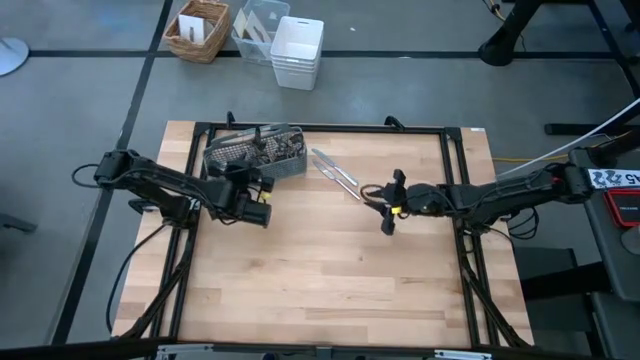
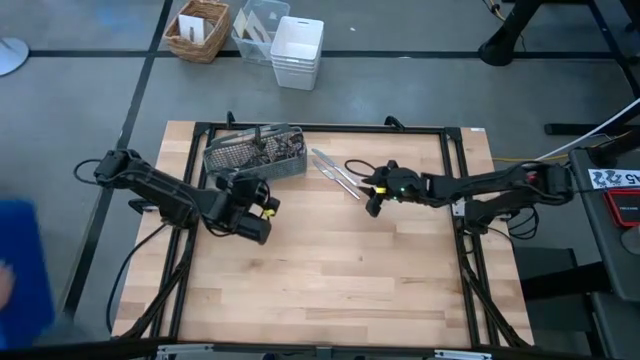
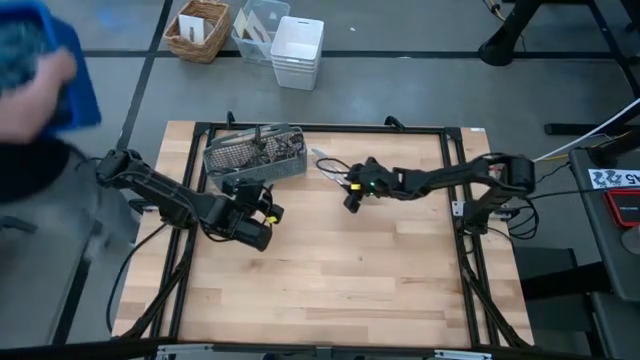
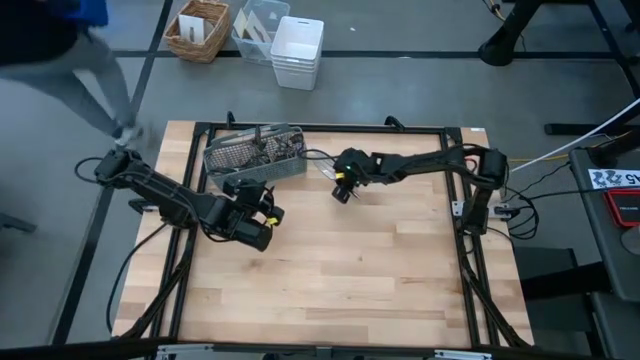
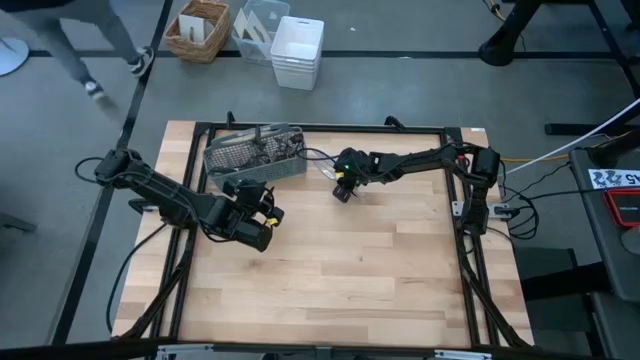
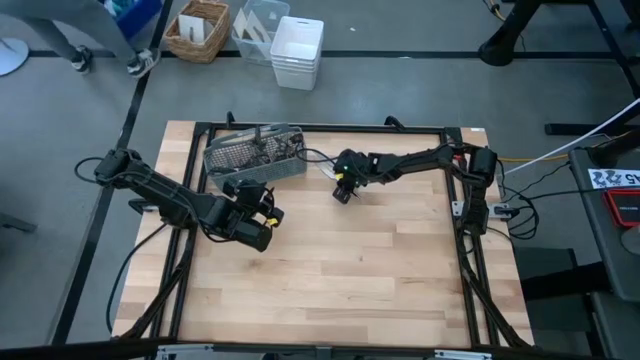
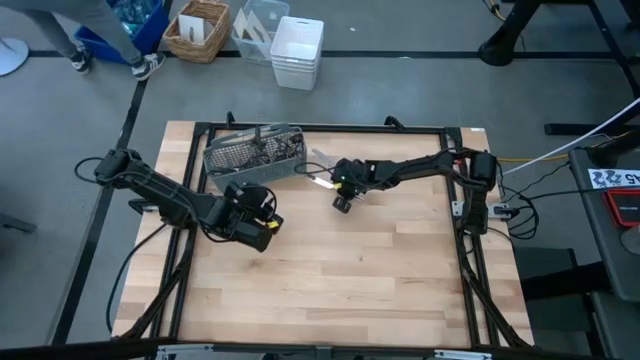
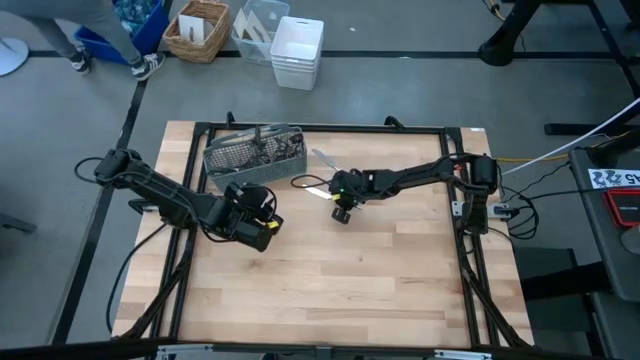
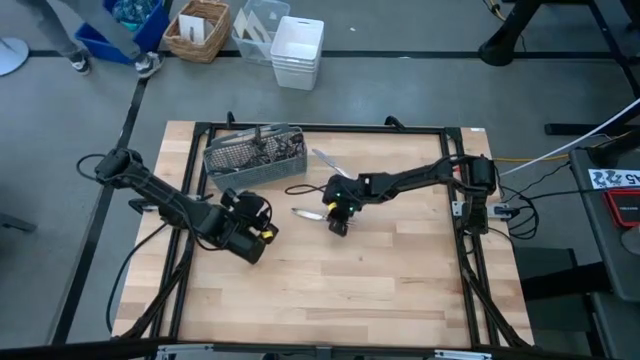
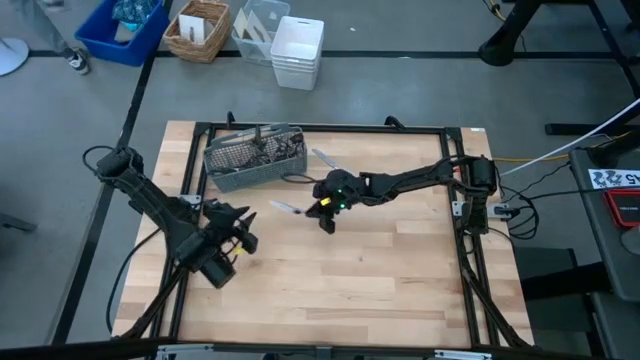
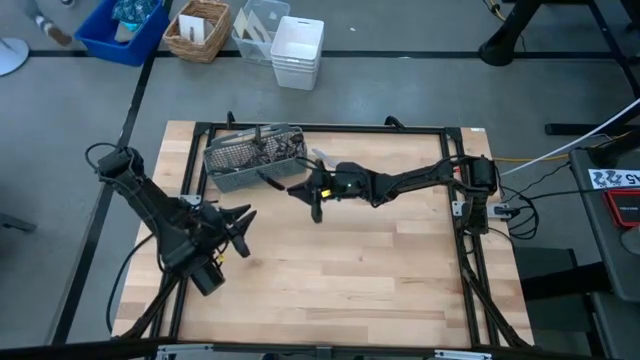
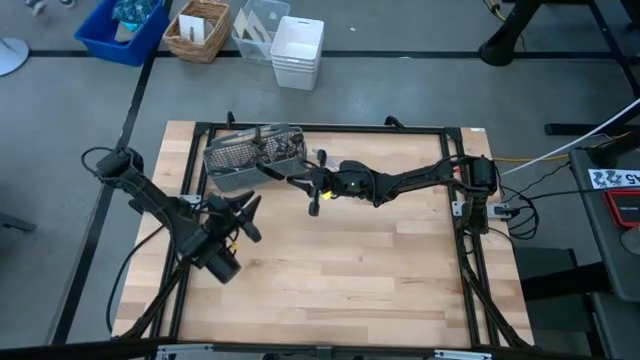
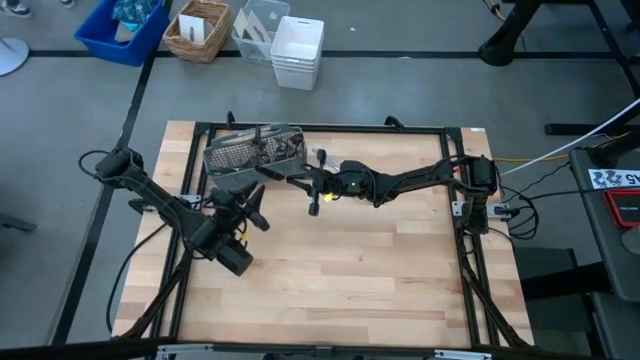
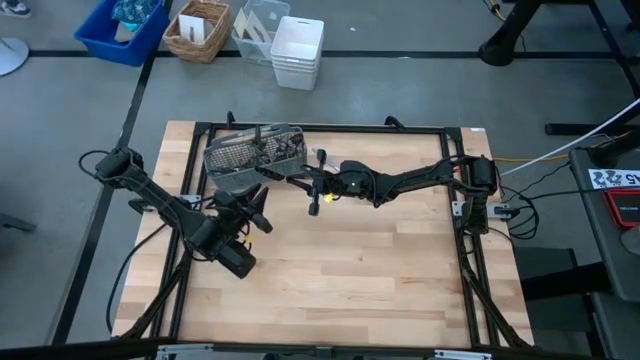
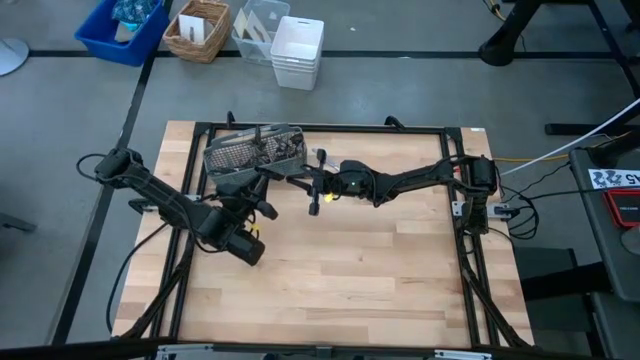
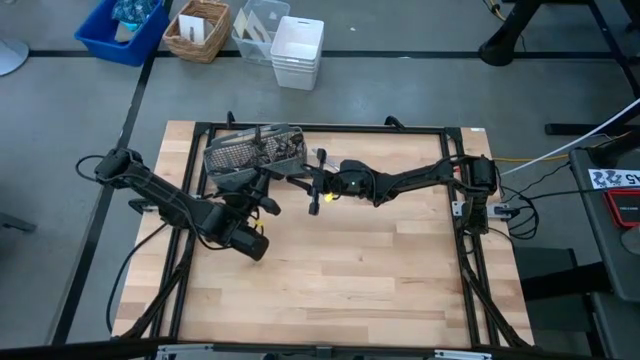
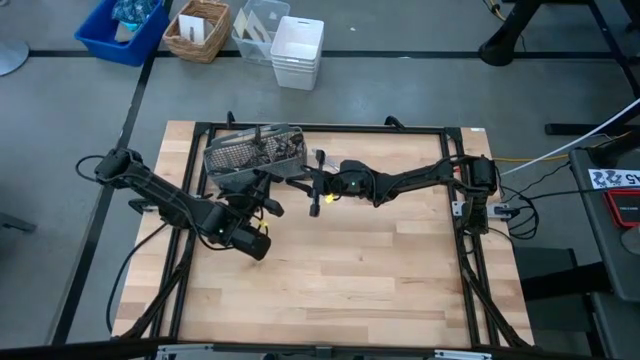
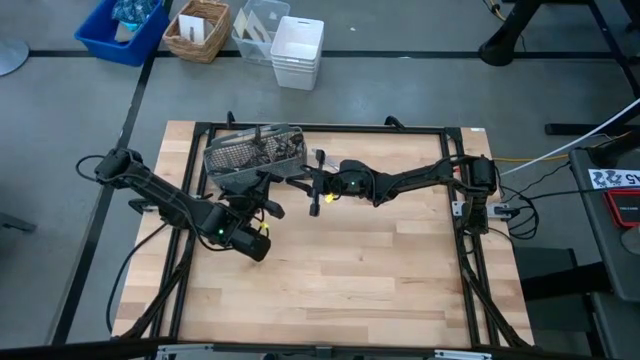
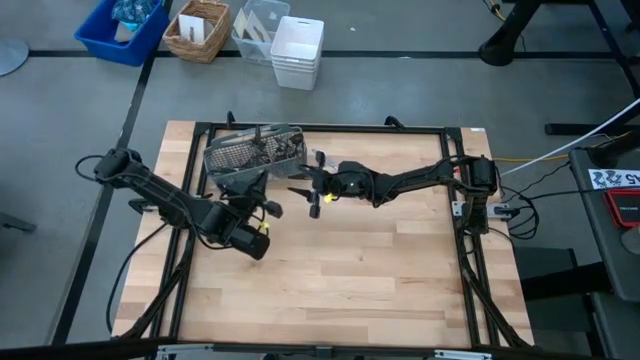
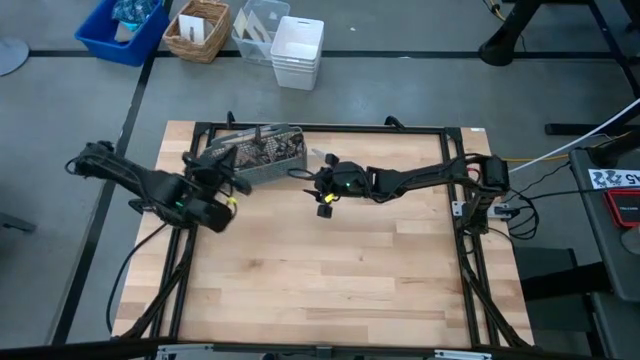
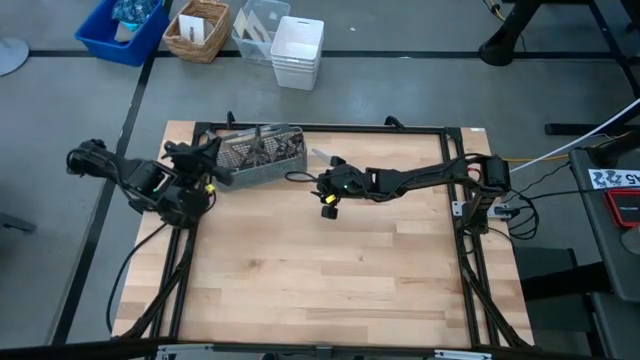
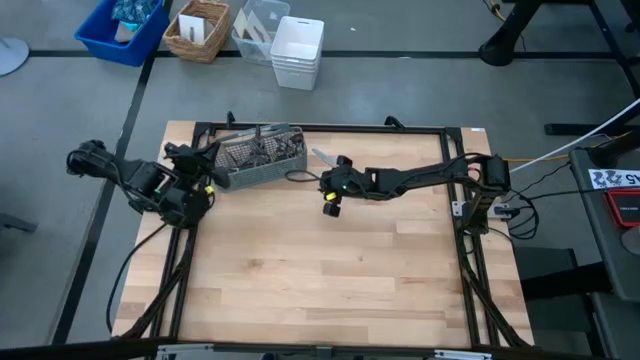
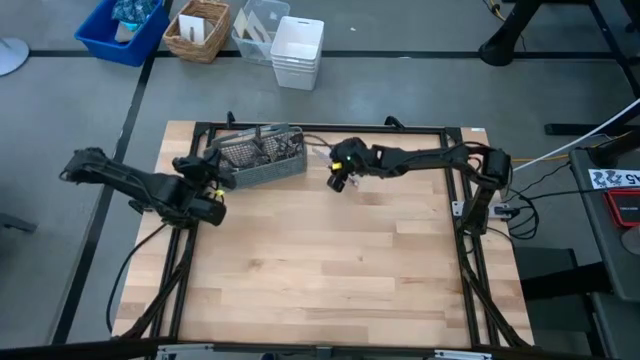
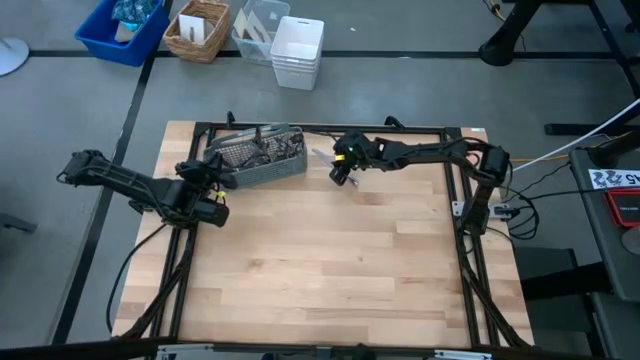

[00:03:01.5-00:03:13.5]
Task: Sort silverware
Put the silver table knife into the silverware rack

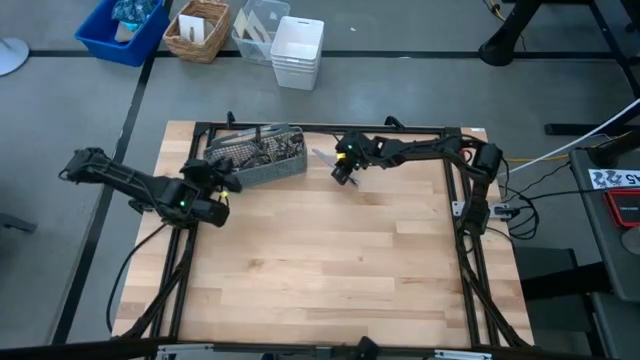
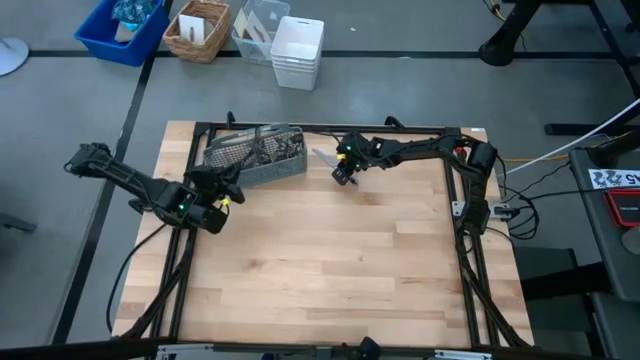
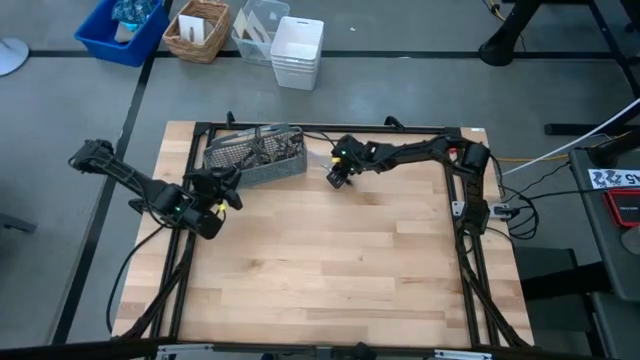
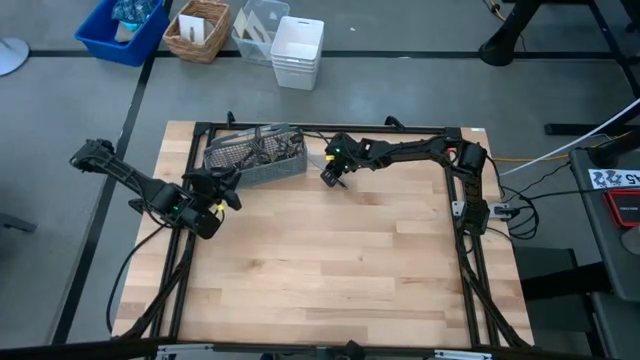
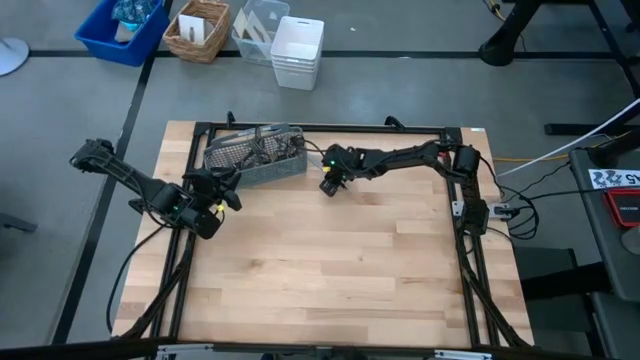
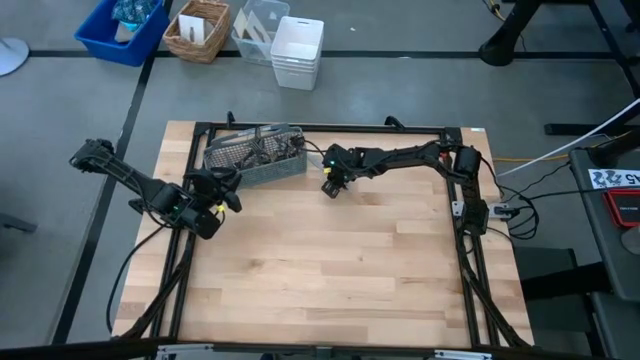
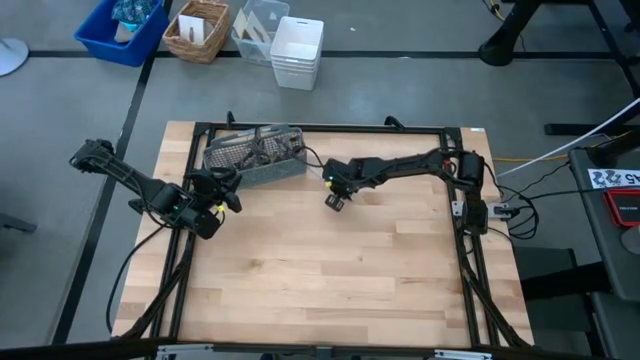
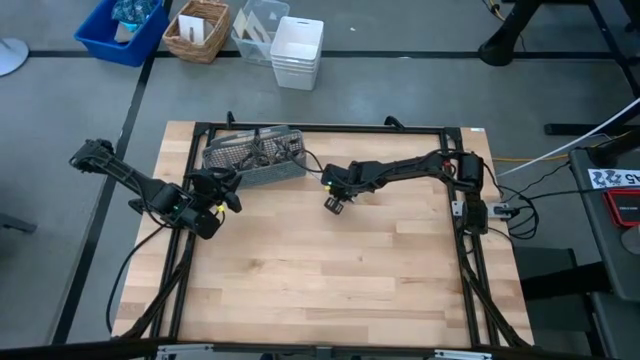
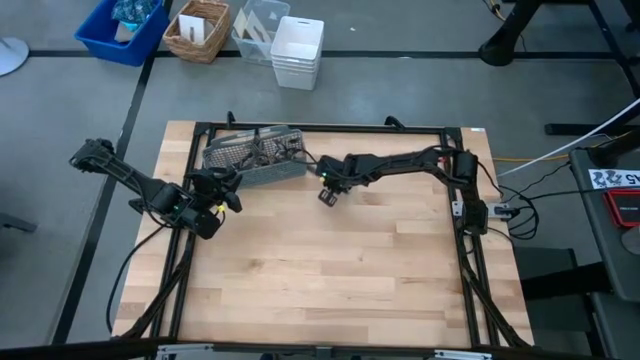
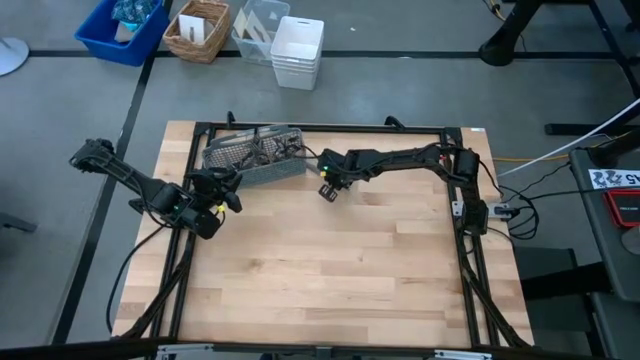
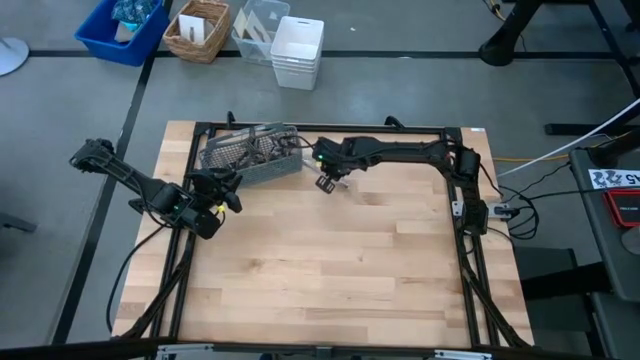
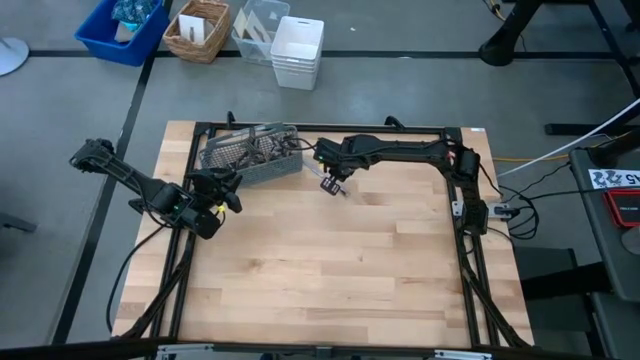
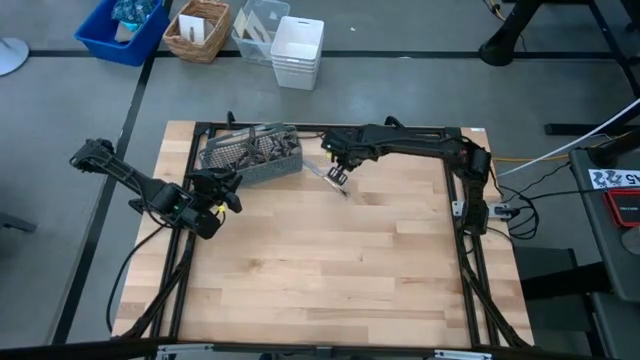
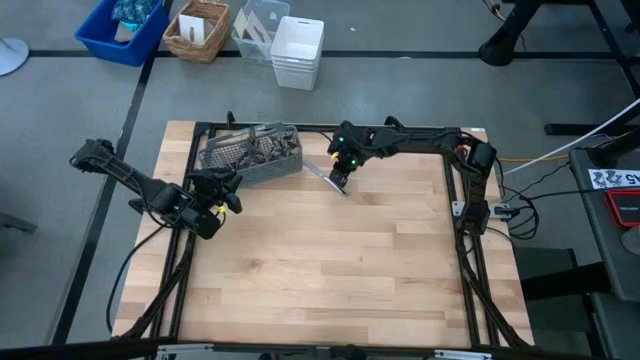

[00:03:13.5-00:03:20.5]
Put the silver table knife into the silverware rack

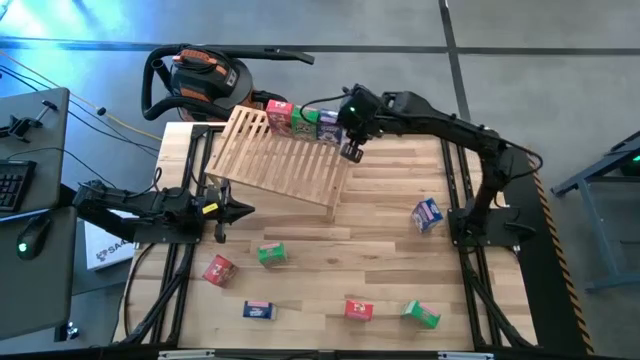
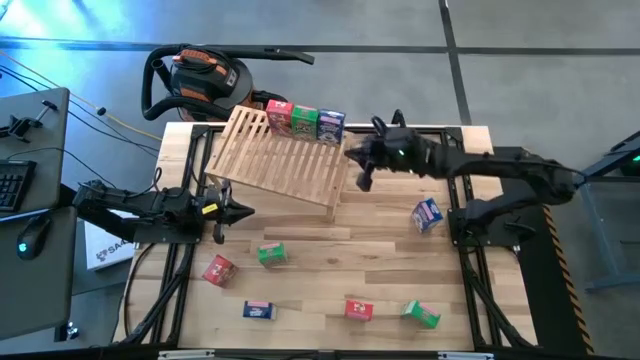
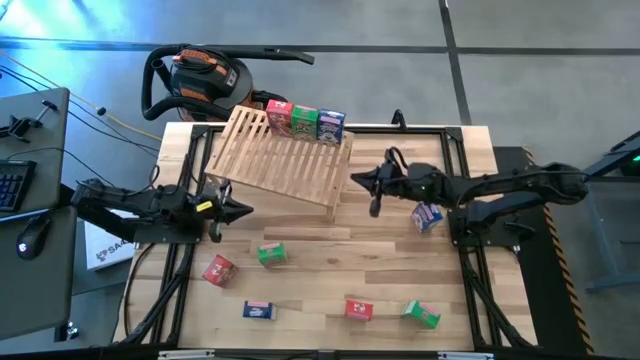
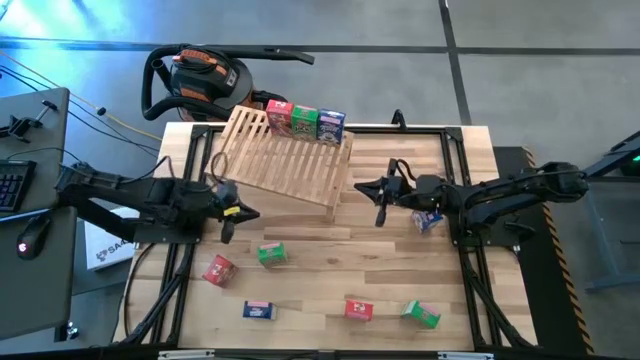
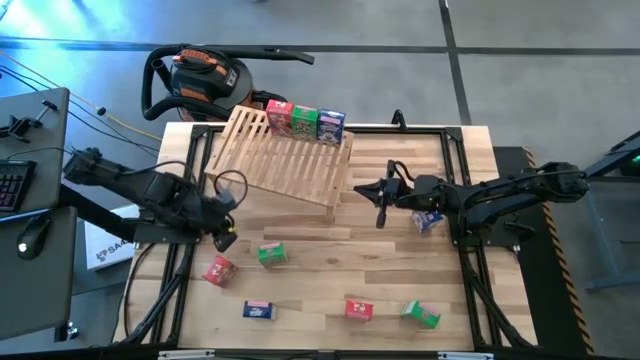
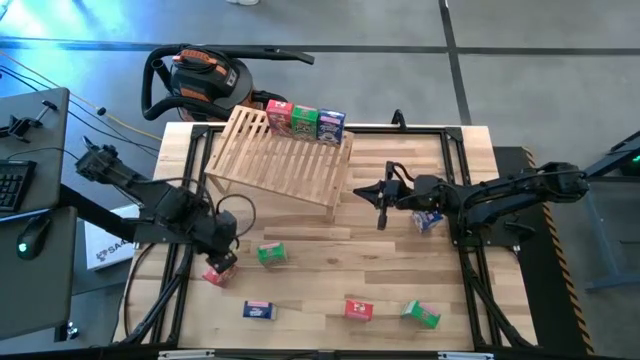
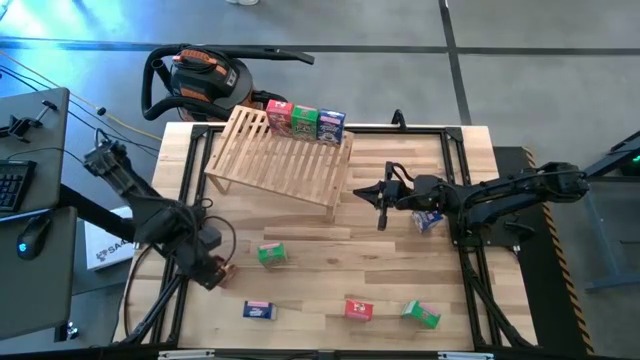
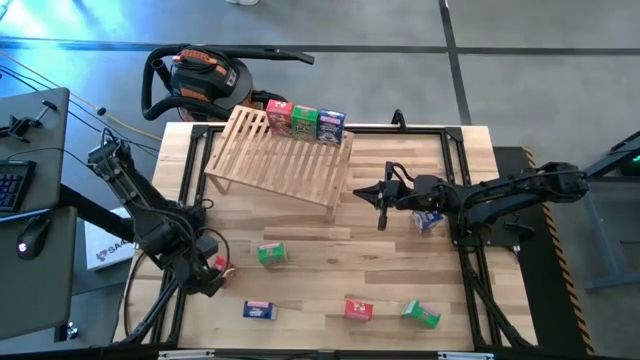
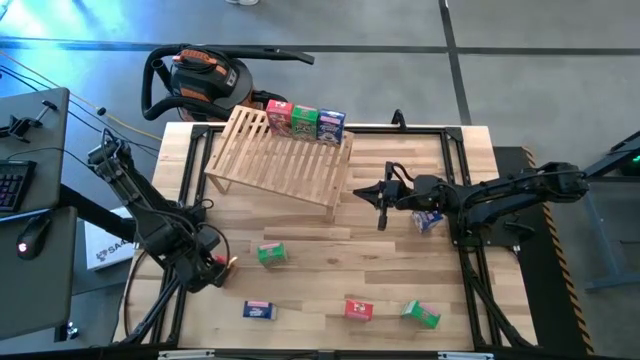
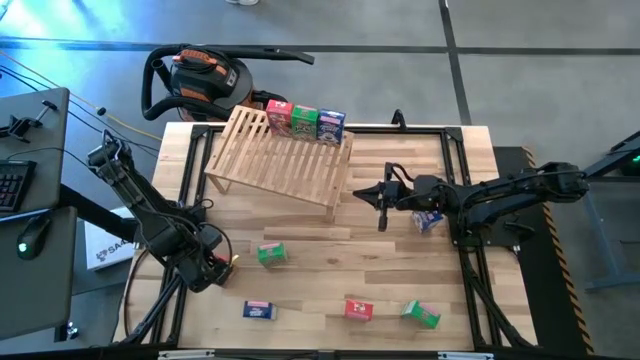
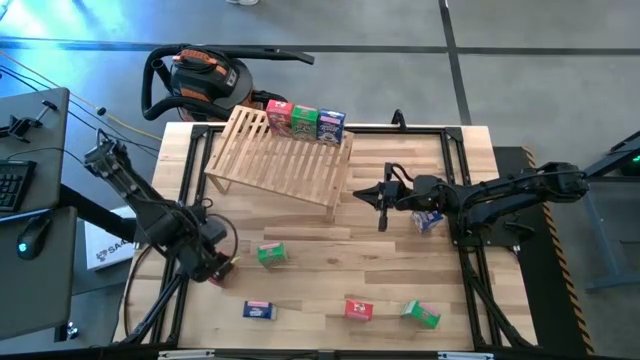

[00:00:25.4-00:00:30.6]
Task: Stack cereal on shelf
Put the left red cereal box aligned with the other red cereal box on the shelf
